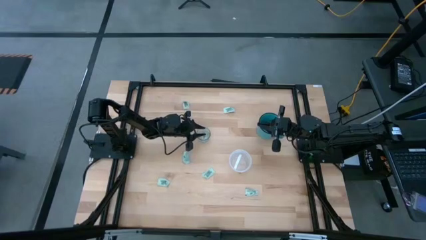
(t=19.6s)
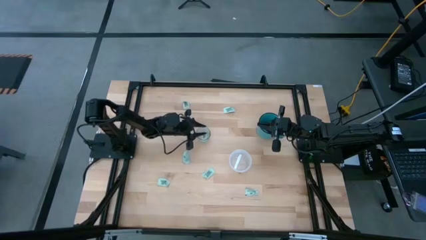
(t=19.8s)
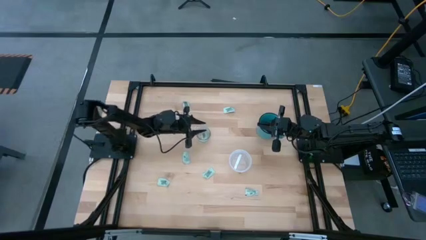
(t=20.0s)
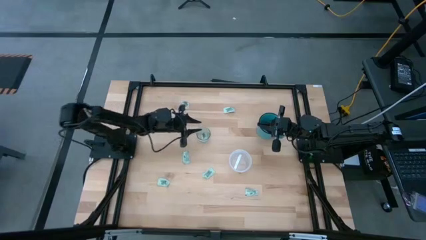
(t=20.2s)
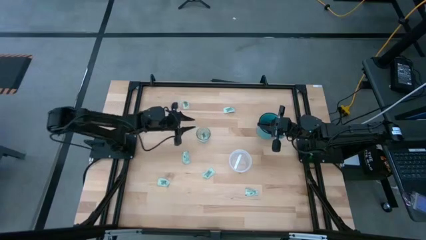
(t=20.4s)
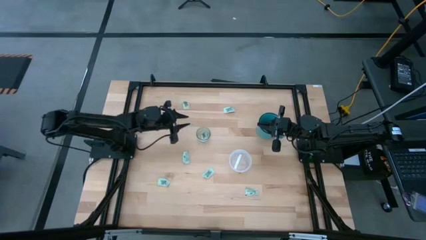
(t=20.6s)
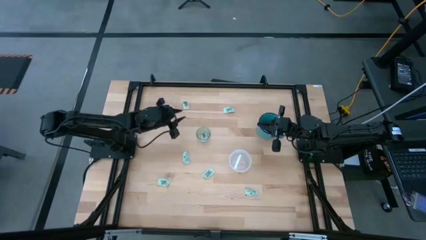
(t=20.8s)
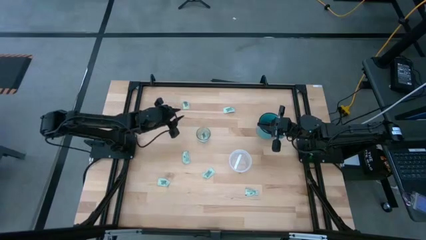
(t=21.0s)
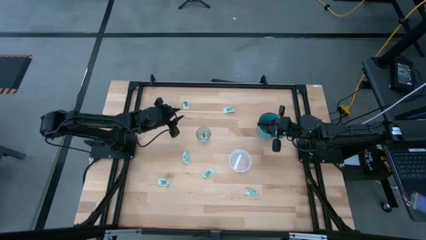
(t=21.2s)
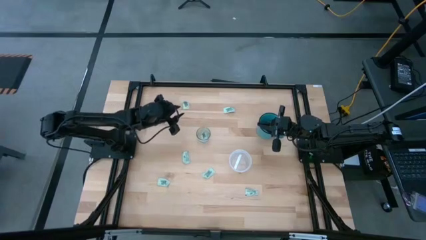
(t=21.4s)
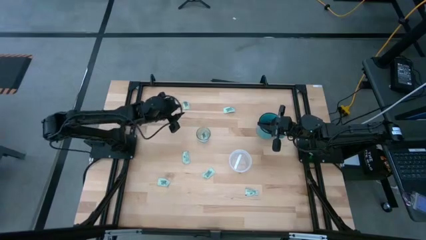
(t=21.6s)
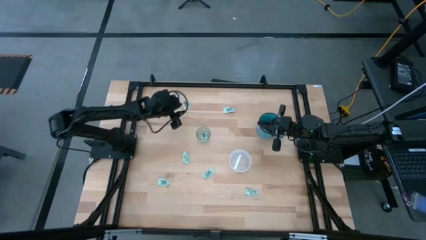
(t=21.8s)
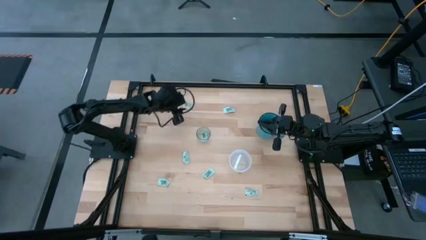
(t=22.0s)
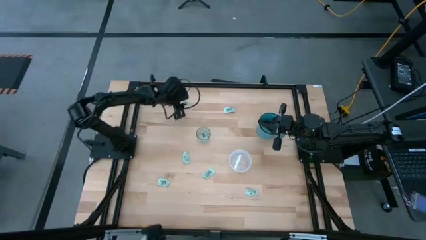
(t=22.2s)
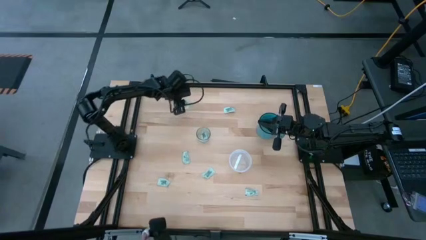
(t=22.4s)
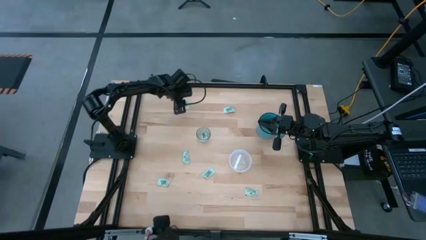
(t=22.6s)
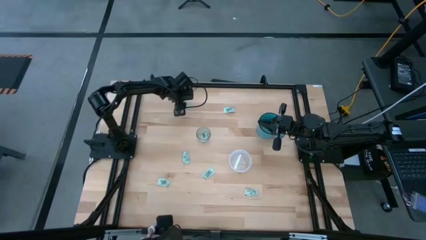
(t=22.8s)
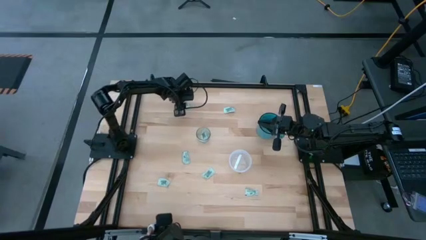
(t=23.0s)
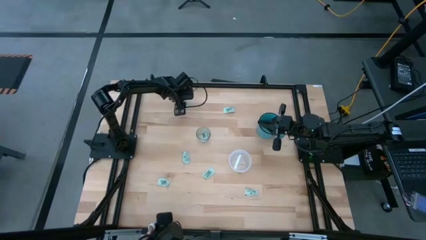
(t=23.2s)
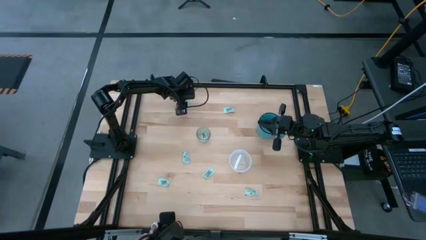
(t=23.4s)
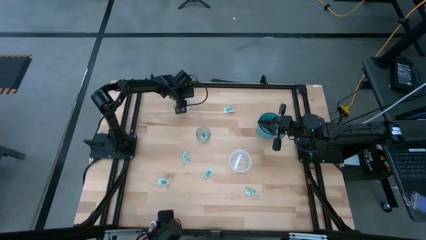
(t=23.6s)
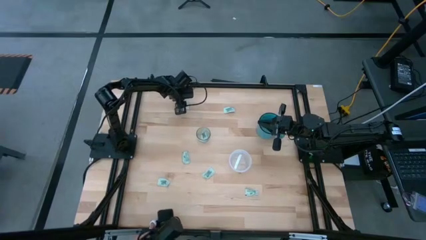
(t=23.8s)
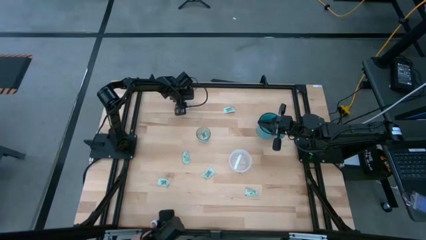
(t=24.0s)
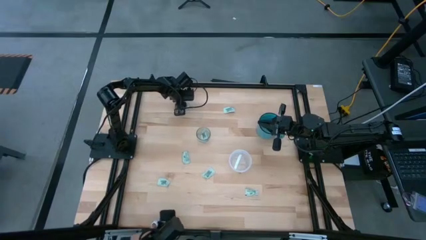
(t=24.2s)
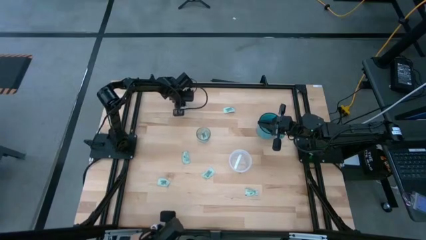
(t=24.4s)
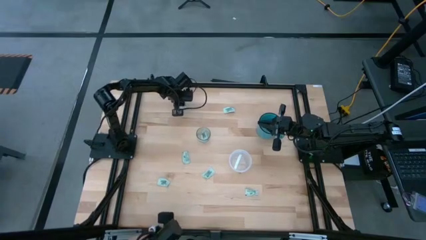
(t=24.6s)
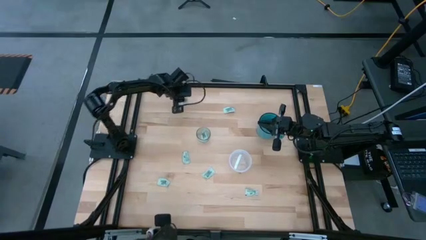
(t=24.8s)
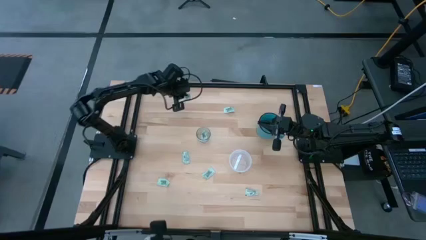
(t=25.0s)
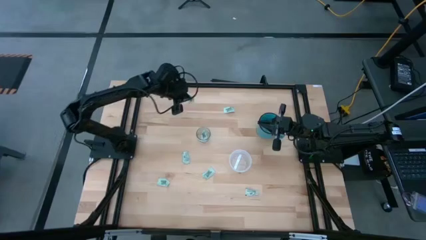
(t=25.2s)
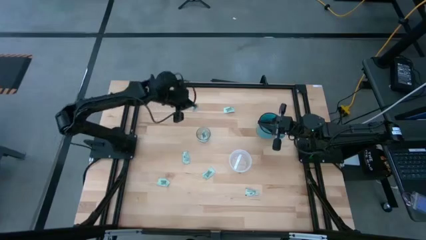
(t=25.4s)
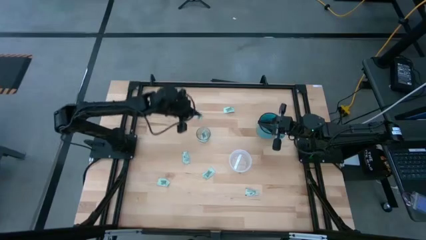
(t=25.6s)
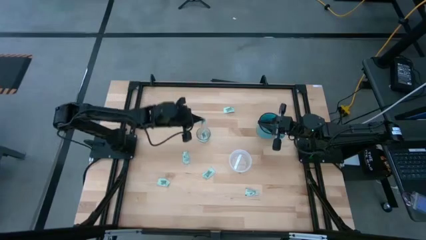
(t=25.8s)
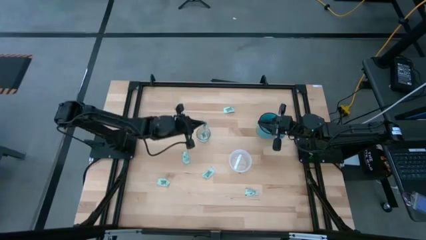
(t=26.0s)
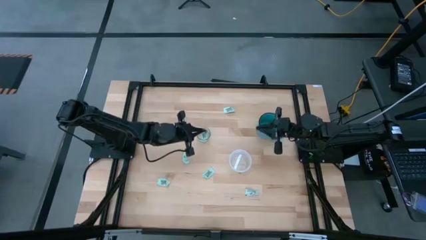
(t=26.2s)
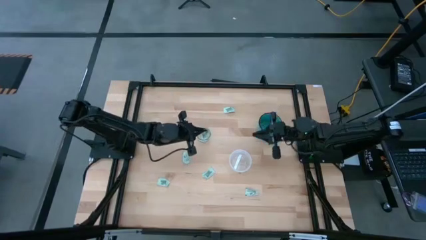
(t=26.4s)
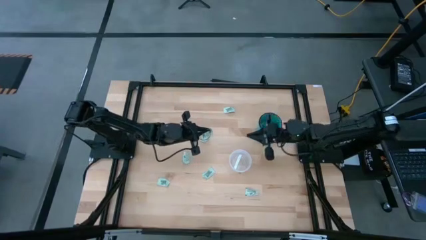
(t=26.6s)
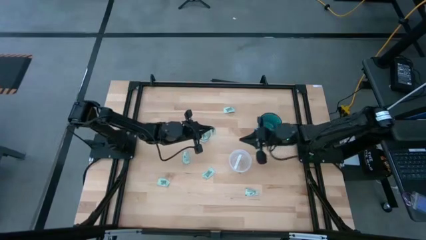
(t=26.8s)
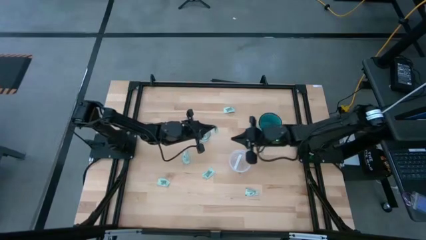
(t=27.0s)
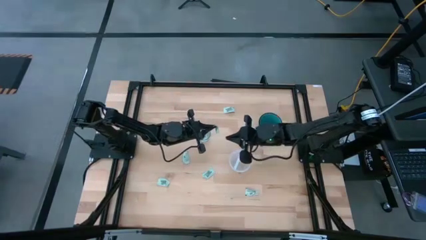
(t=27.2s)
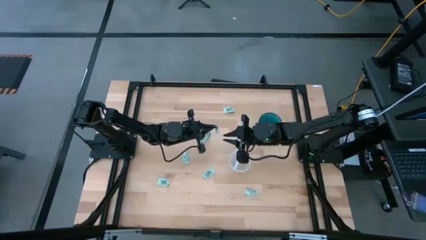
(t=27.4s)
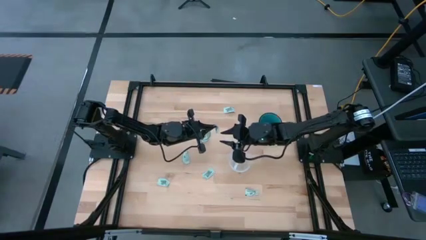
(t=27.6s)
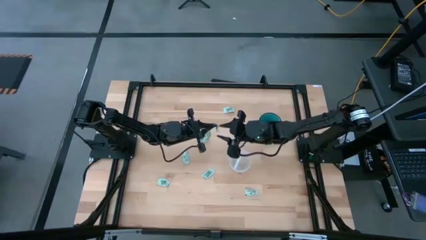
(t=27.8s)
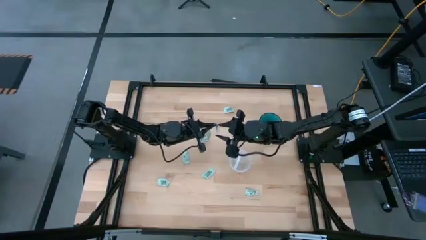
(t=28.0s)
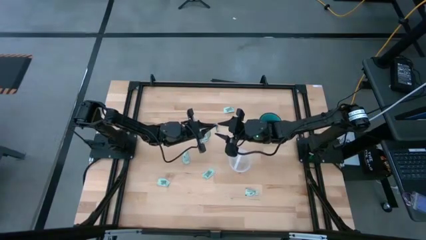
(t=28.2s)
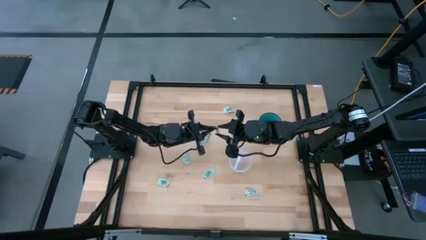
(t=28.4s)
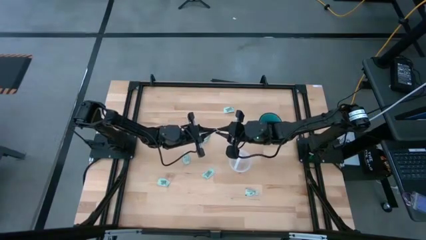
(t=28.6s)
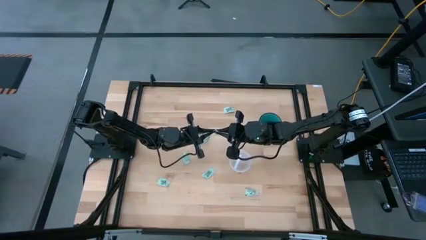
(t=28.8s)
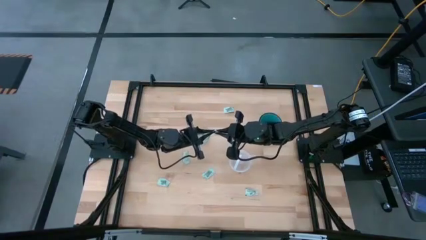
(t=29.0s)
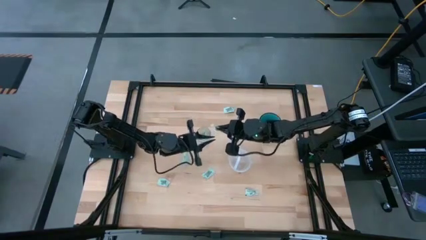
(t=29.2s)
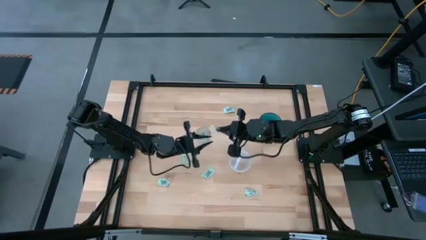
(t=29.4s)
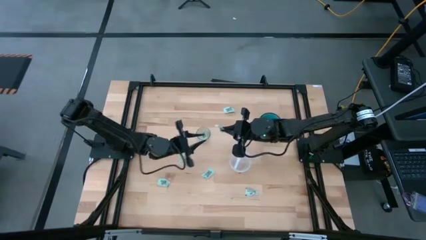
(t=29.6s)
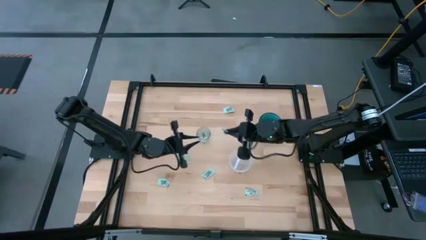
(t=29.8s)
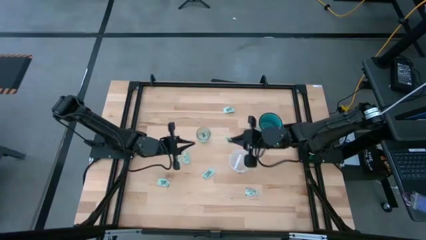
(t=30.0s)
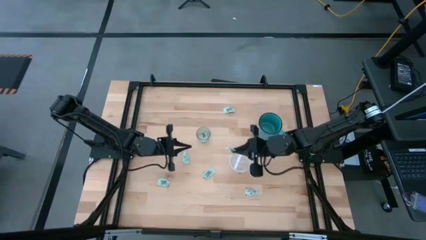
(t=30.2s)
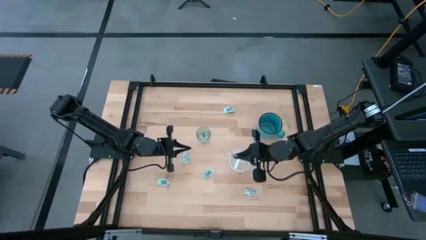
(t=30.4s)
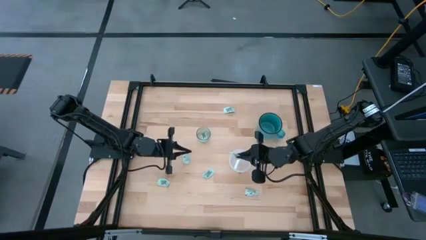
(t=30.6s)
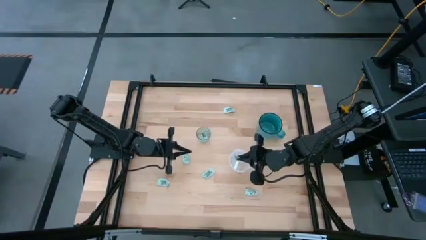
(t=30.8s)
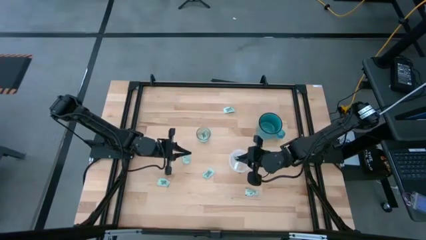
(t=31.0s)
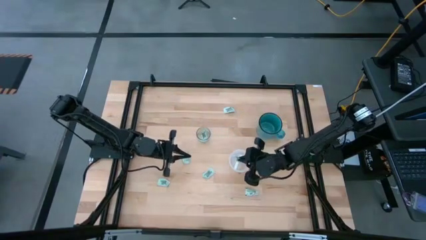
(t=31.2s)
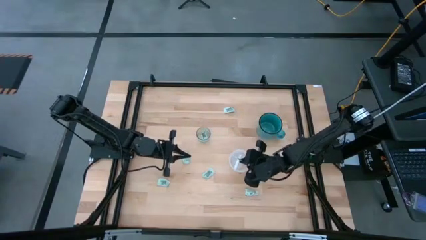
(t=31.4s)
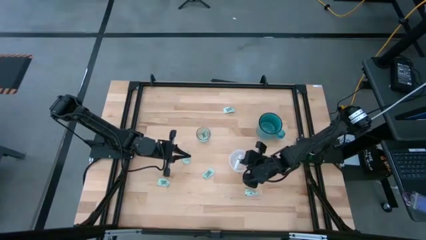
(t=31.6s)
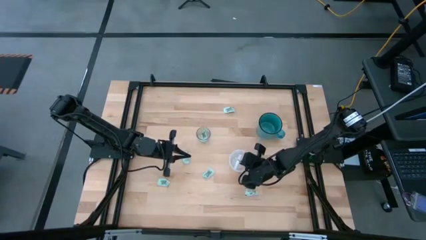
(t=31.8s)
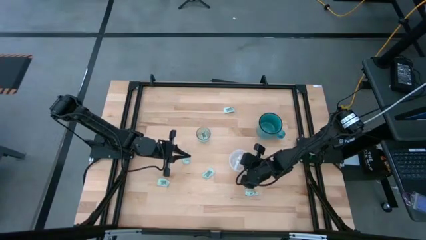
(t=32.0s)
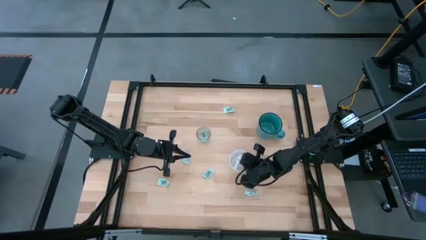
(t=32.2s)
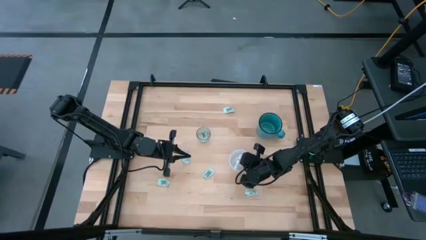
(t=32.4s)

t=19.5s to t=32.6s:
Task: Pick and place Stevia / Truvia into bins
Put the stevia packet into the transparent container
